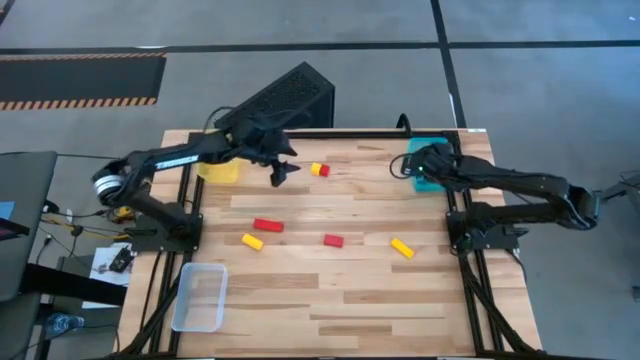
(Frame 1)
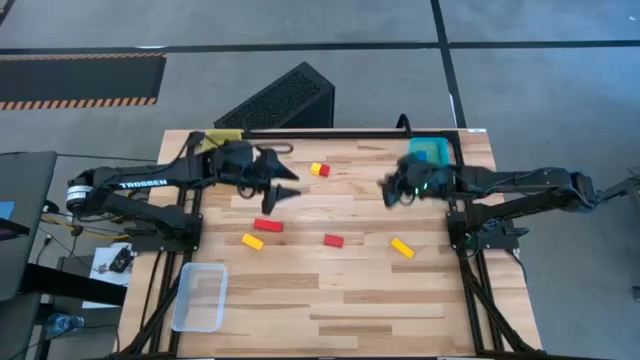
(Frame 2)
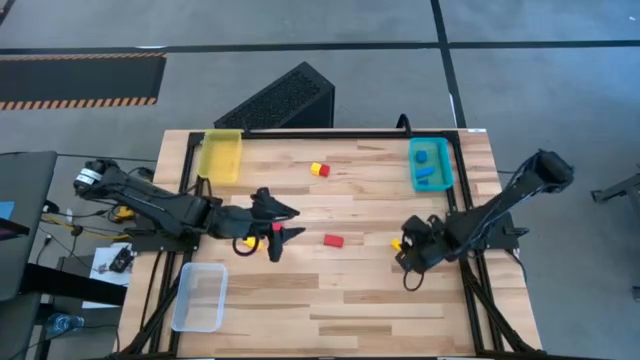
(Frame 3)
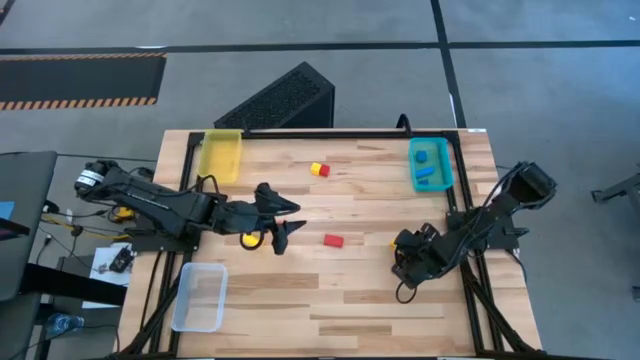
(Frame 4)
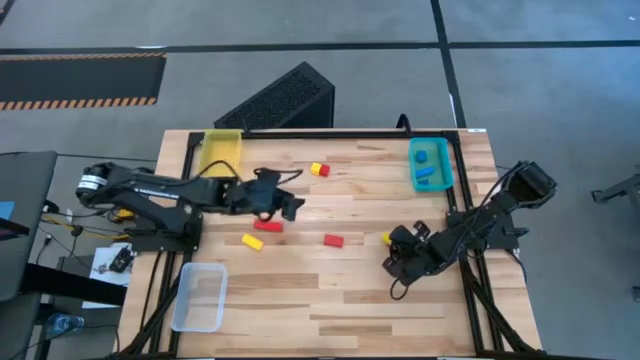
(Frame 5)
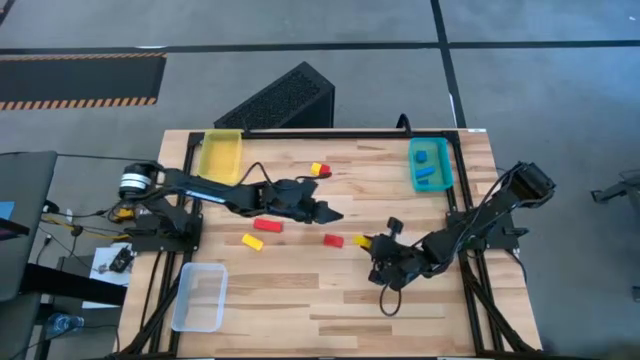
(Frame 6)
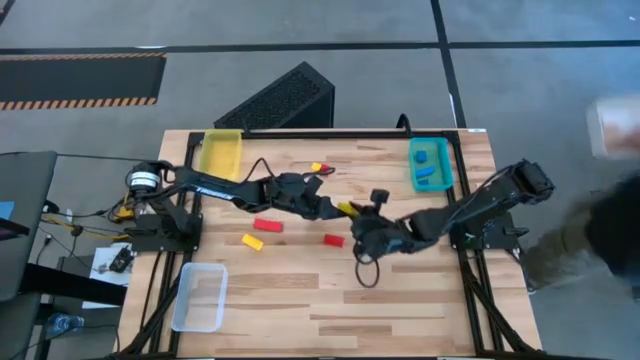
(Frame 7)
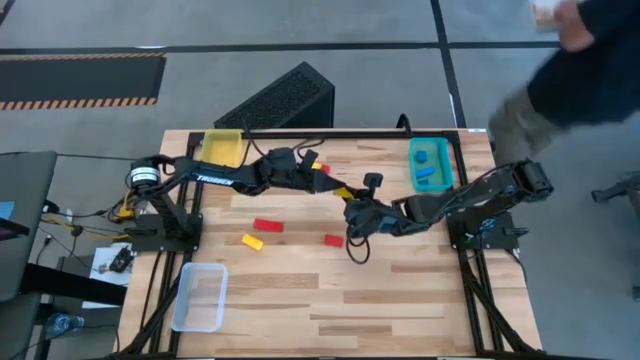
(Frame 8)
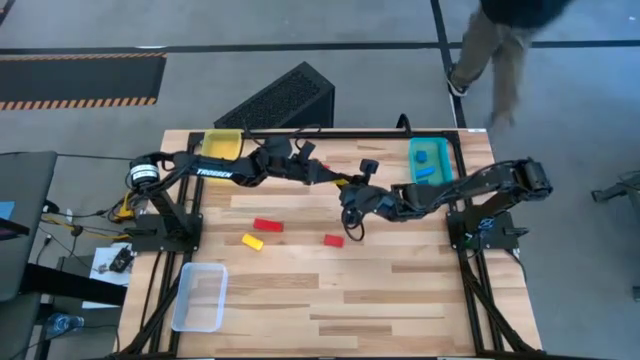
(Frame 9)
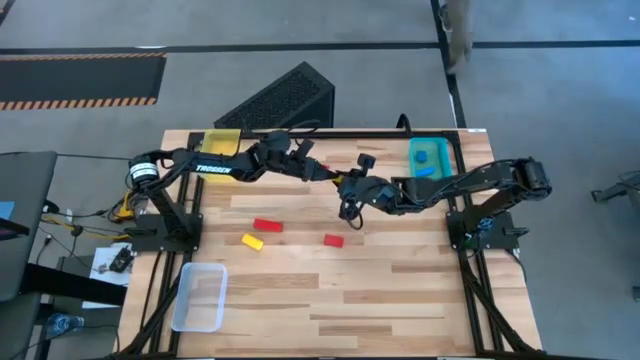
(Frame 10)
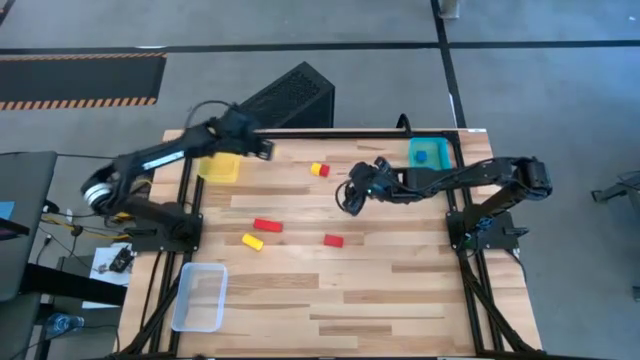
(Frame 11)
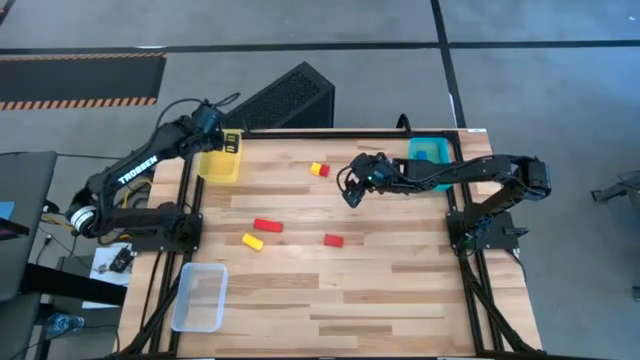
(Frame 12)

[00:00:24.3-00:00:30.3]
Task: Sort & place blocks by color
Put the yellow rectangle wooden block into the yellow bin

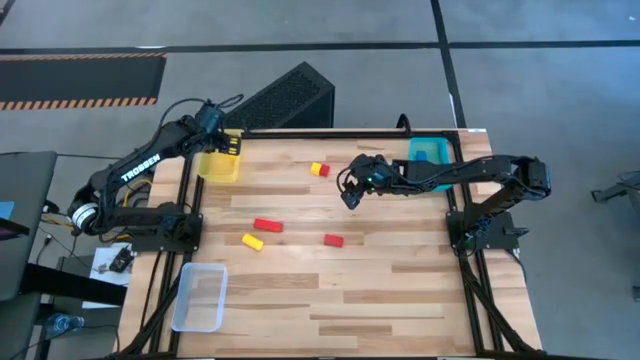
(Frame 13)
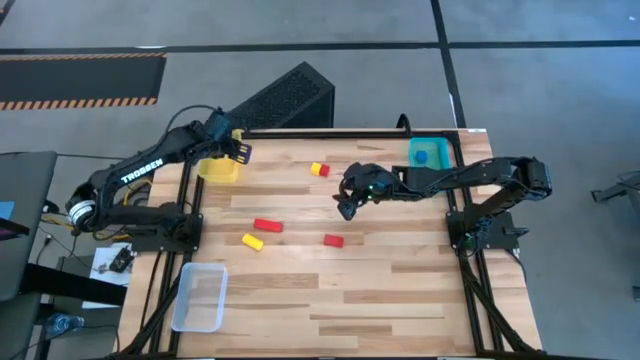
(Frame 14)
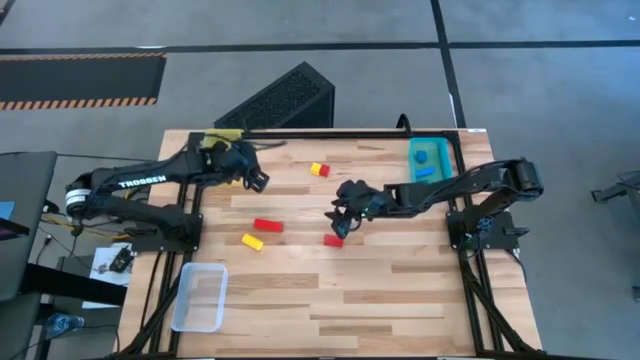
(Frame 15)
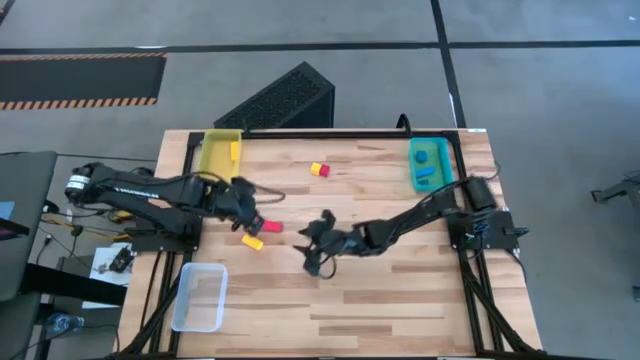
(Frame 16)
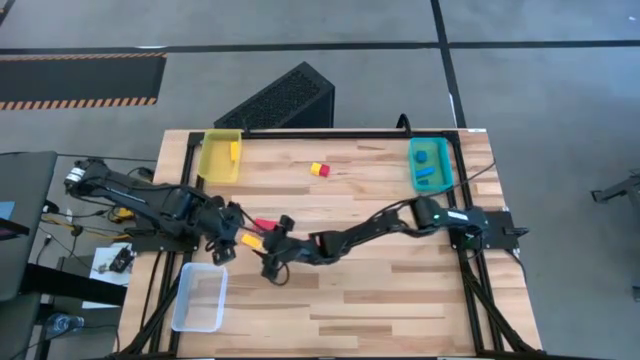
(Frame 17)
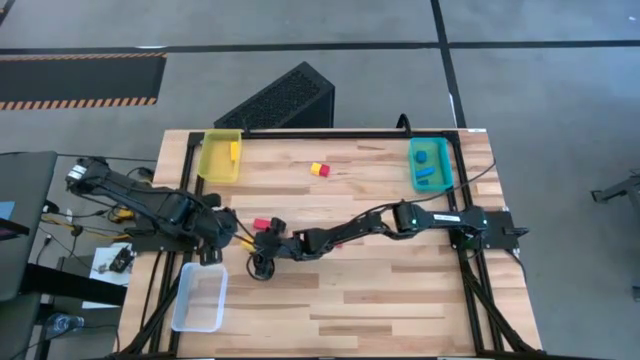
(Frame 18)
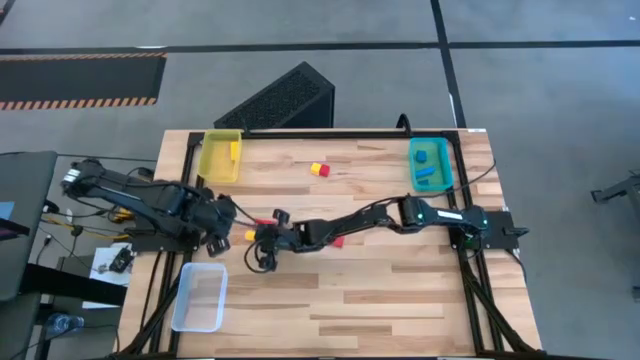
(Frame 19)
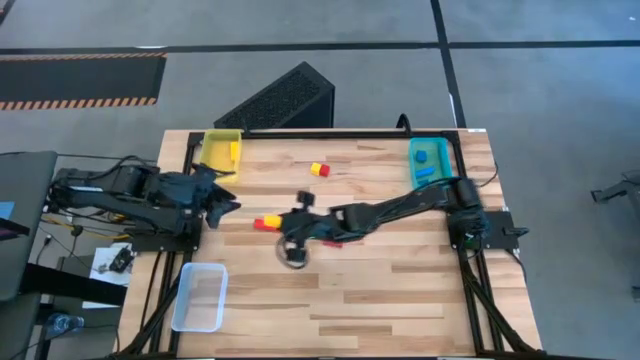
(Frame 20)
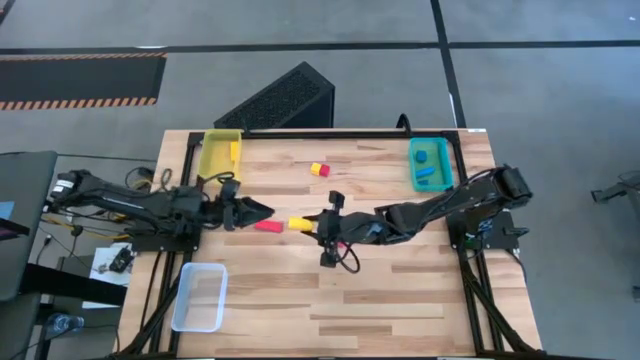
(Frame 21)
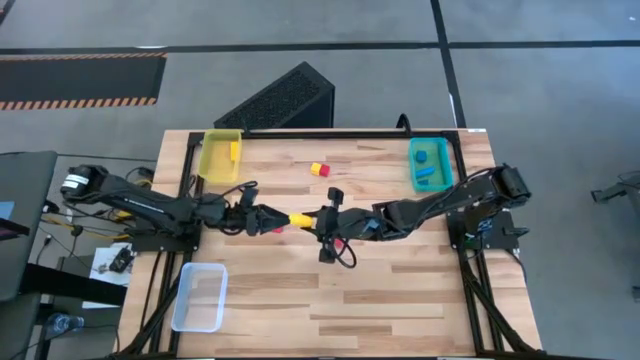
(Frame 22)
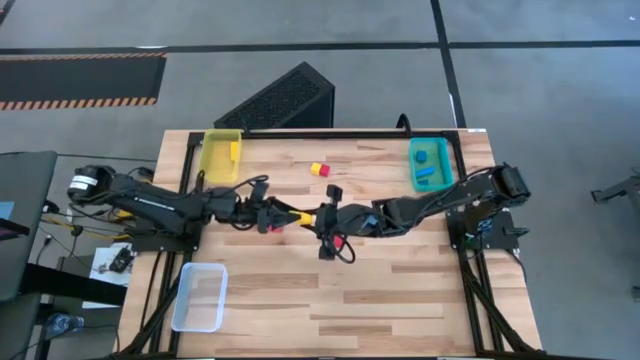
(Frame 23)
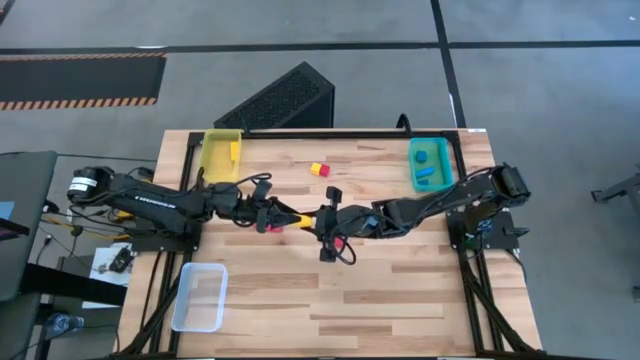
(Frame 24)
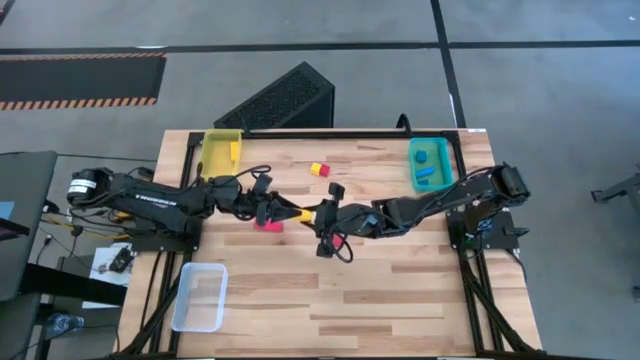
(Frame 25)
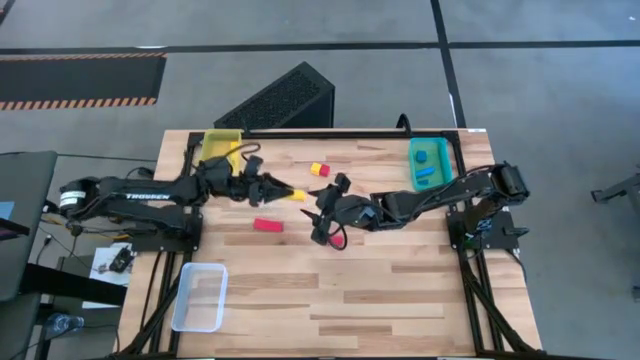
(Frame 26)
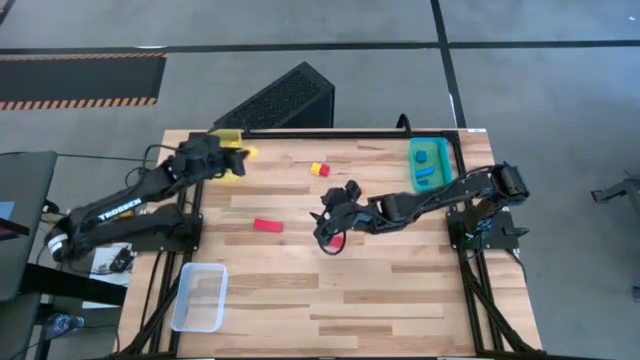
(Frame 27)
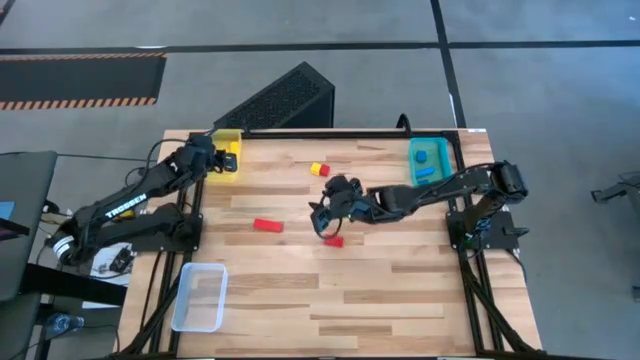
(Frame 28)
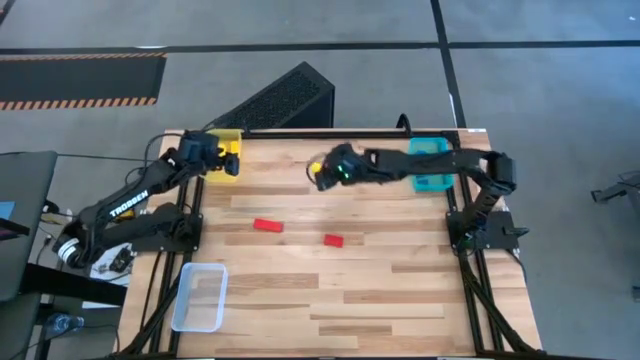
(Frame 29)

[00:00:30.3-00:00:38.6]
Put the yellow cylindrical wooden block into the yellow bin

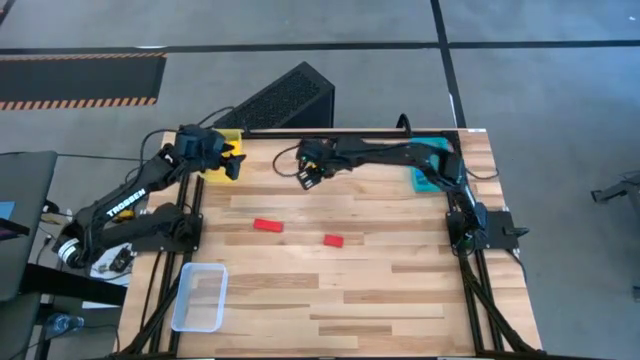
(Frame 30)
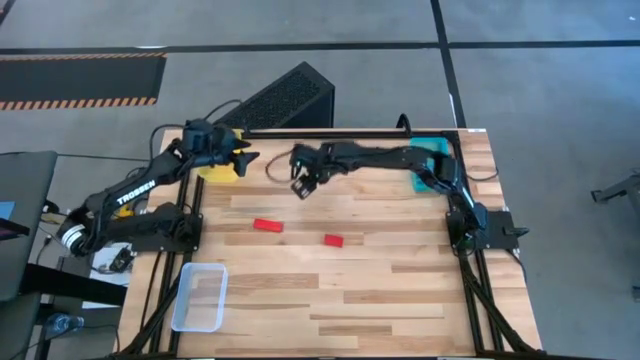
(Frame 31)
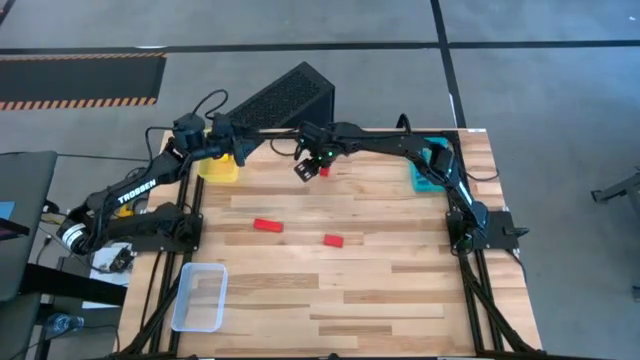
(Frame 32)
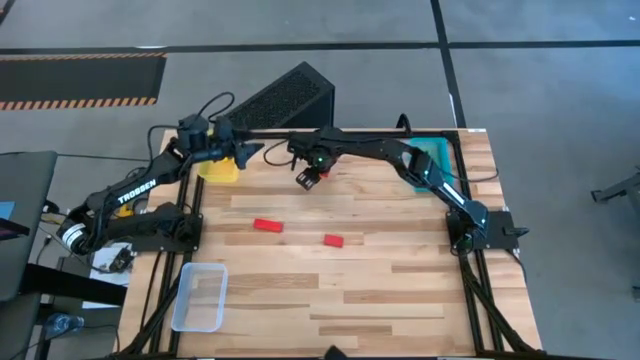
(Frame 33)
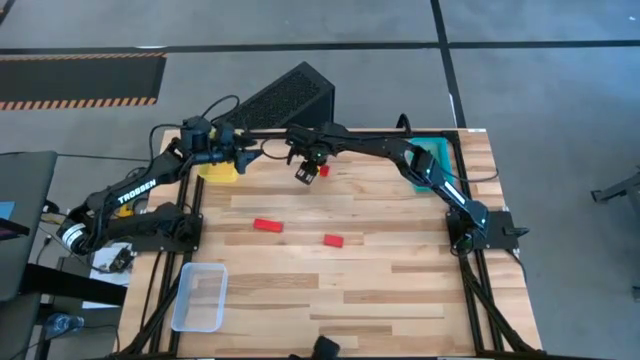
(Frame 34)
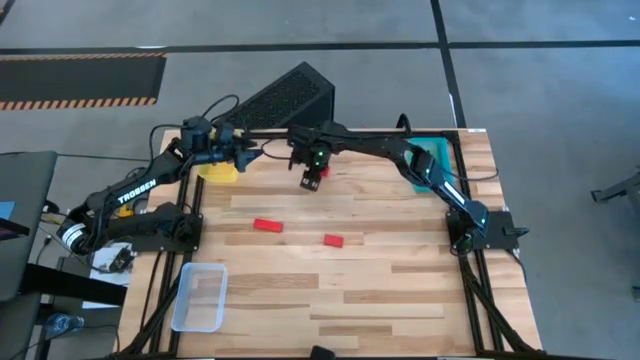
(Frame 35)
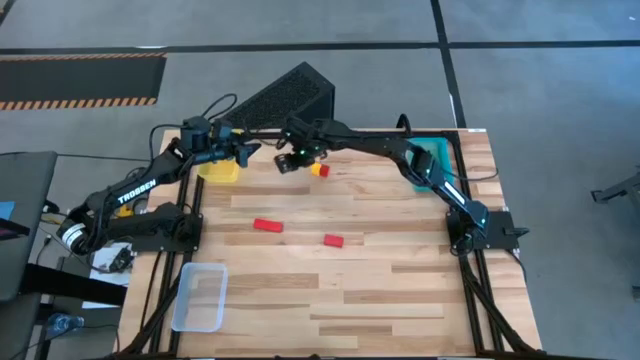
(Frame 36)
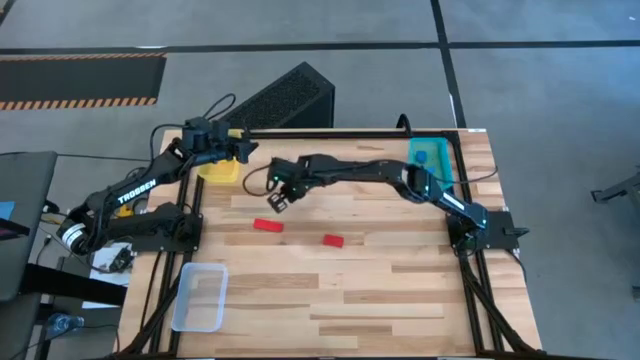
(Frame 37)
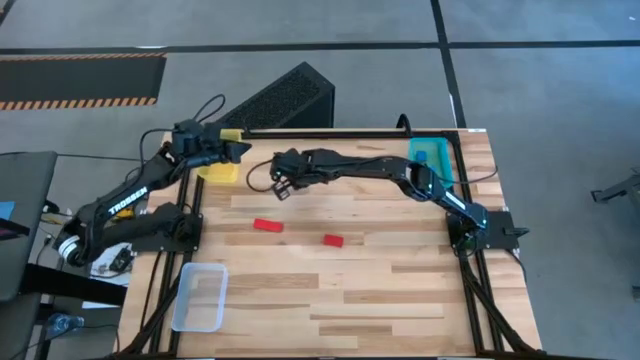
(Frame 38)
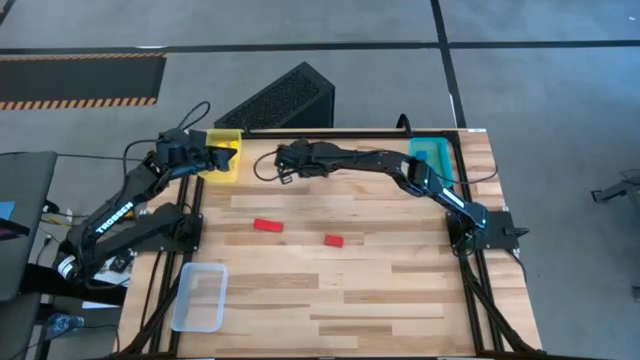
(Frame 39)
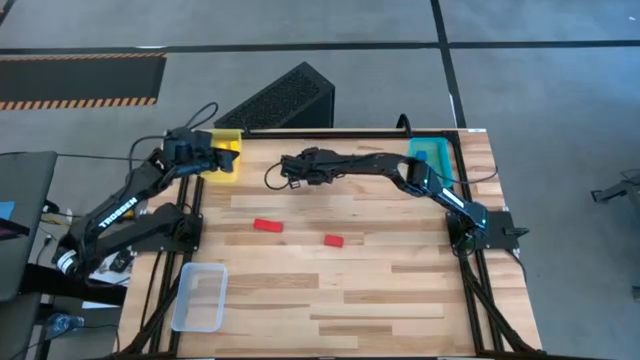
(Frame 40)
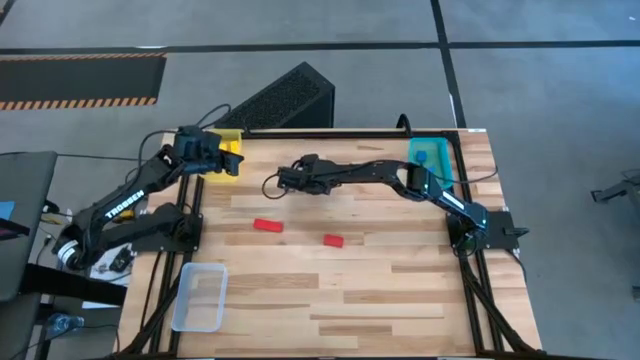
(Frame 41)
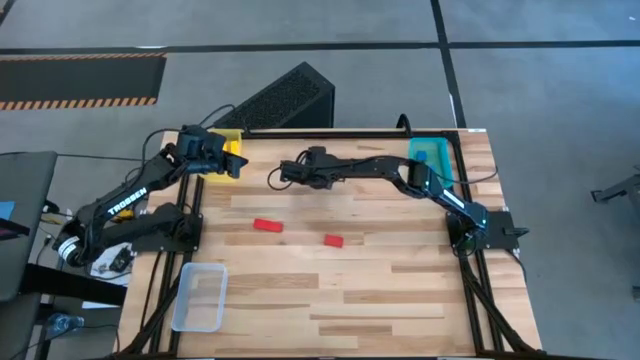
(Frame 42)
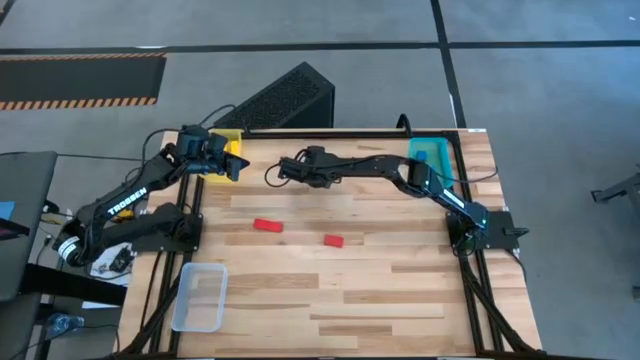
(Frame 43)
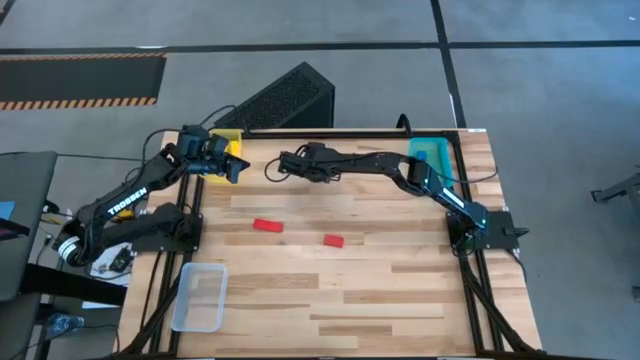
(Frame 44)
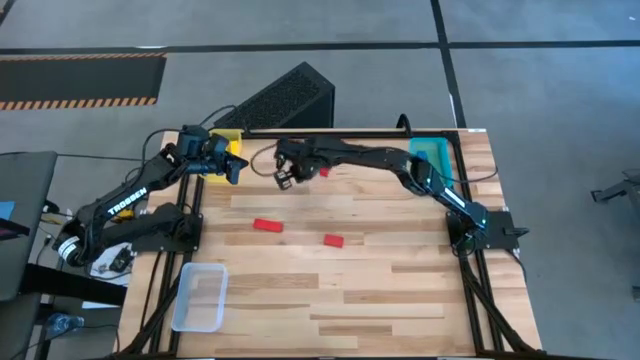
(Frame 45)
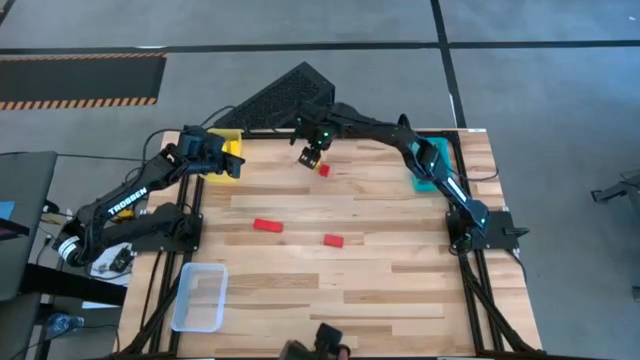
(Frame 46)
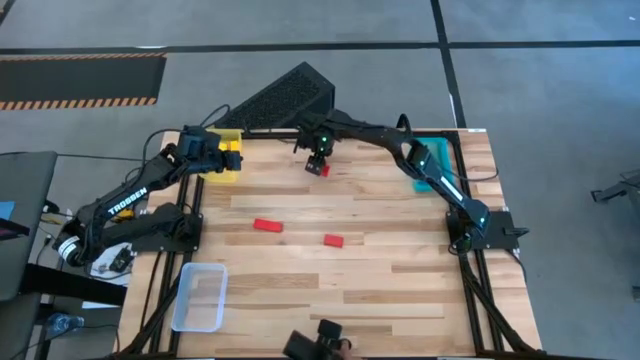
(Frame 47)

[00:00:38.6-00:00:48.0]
Put the yellow square wooden block into the yellow bin
